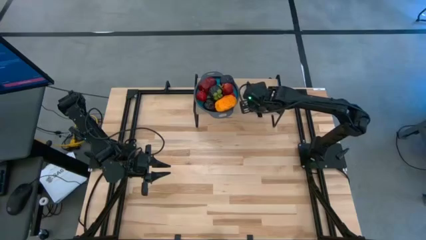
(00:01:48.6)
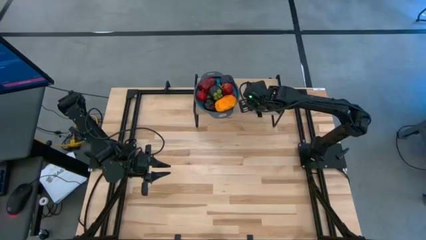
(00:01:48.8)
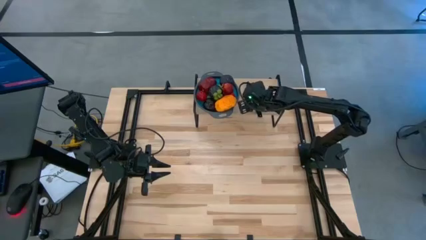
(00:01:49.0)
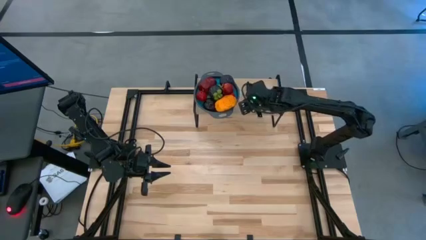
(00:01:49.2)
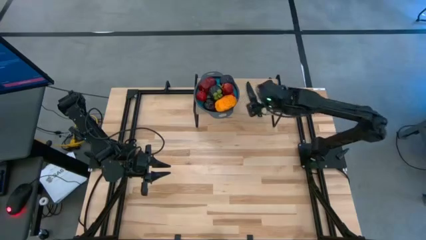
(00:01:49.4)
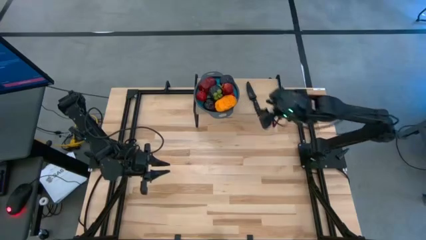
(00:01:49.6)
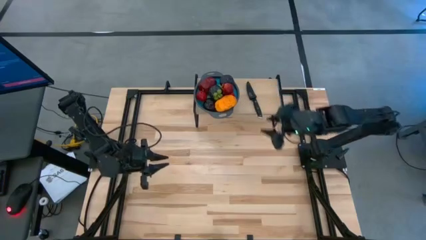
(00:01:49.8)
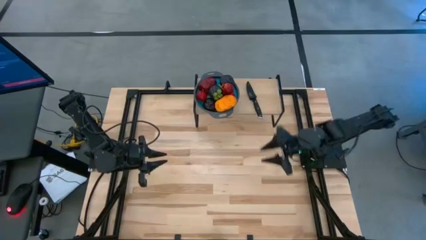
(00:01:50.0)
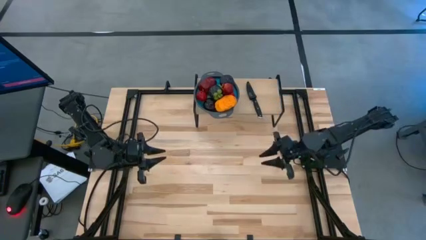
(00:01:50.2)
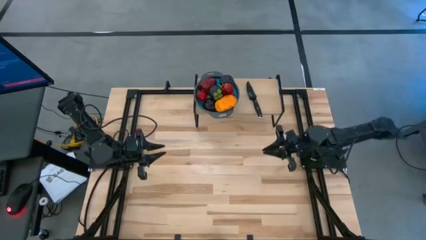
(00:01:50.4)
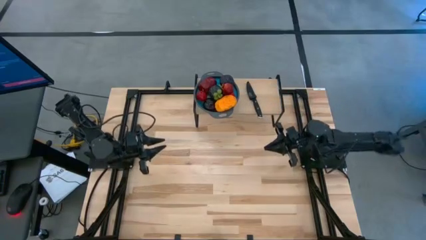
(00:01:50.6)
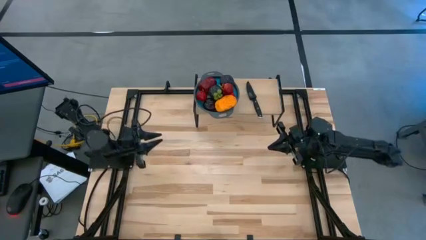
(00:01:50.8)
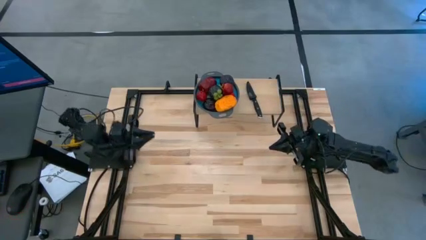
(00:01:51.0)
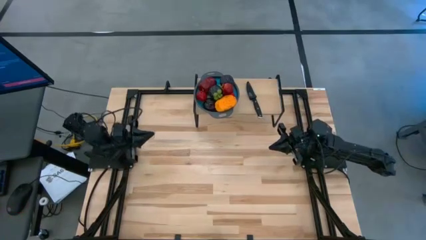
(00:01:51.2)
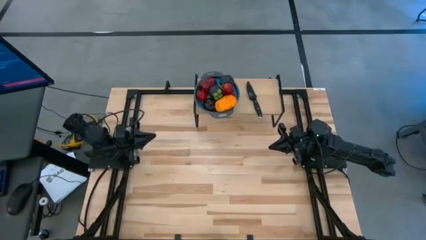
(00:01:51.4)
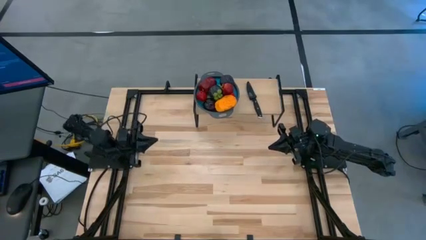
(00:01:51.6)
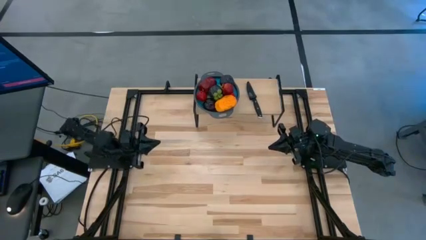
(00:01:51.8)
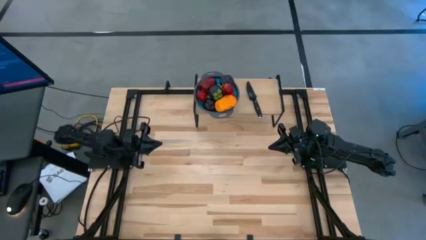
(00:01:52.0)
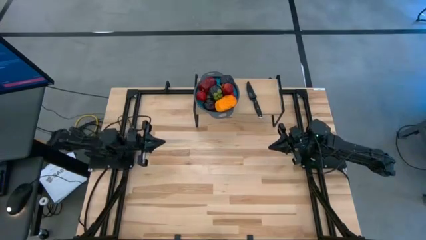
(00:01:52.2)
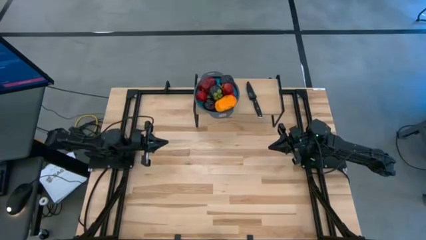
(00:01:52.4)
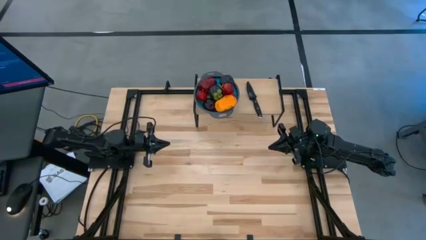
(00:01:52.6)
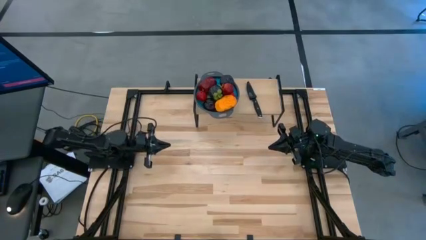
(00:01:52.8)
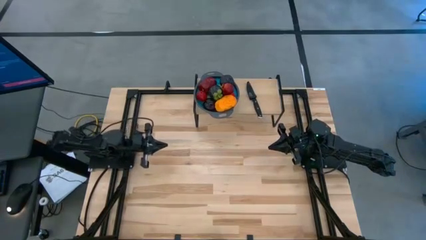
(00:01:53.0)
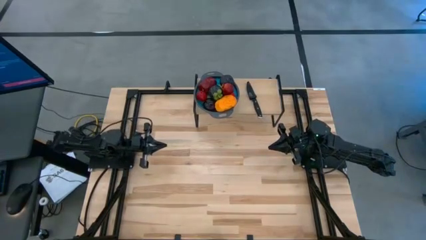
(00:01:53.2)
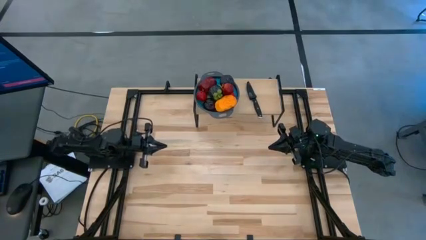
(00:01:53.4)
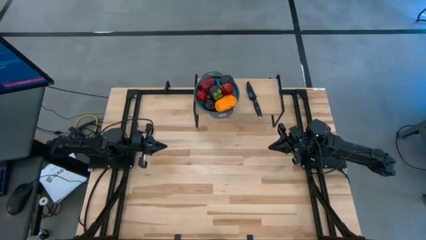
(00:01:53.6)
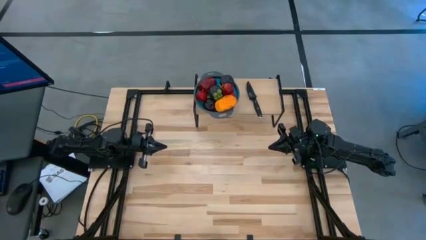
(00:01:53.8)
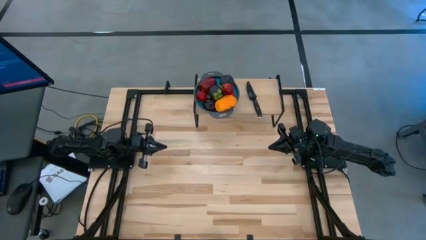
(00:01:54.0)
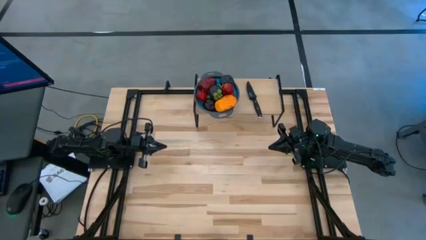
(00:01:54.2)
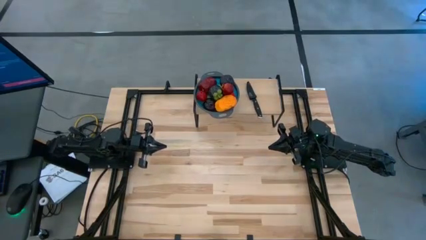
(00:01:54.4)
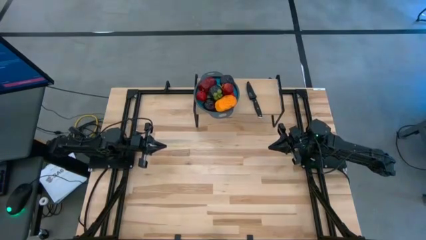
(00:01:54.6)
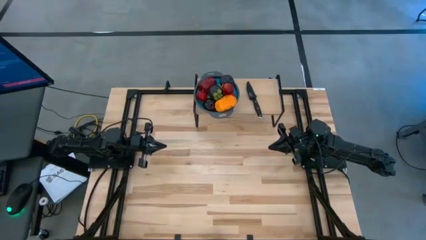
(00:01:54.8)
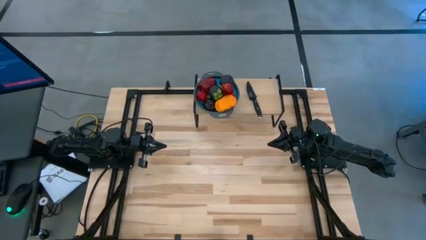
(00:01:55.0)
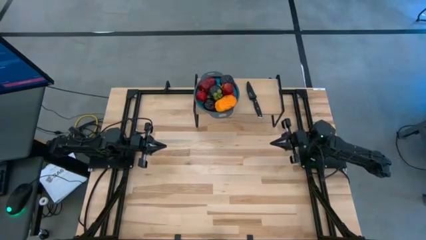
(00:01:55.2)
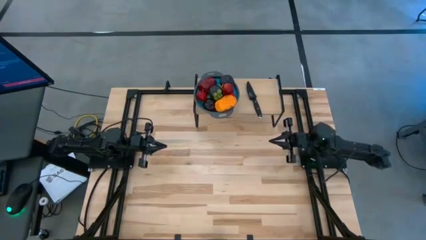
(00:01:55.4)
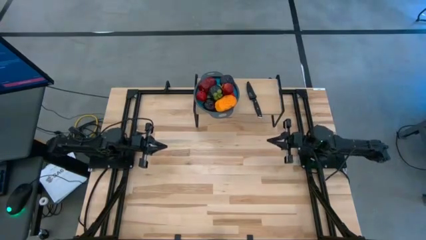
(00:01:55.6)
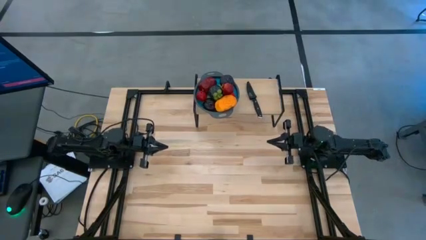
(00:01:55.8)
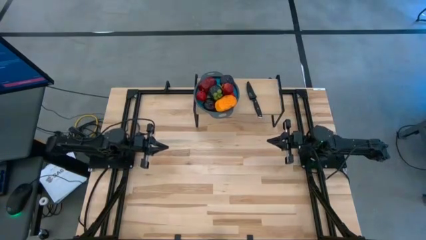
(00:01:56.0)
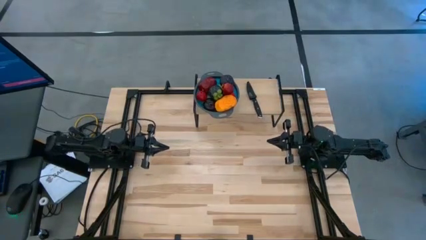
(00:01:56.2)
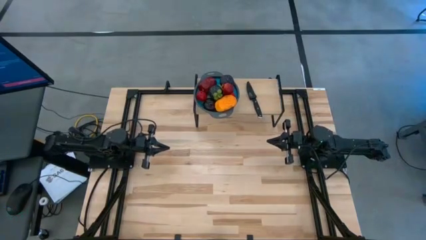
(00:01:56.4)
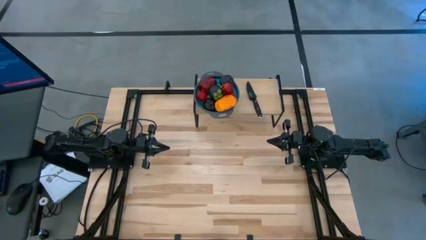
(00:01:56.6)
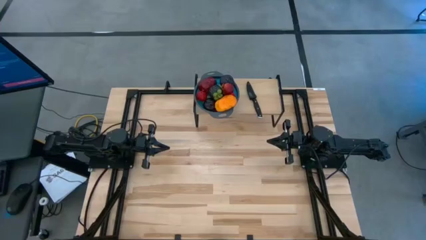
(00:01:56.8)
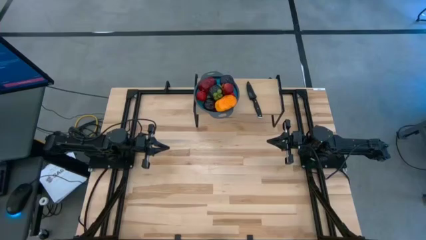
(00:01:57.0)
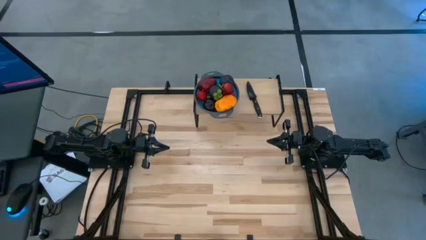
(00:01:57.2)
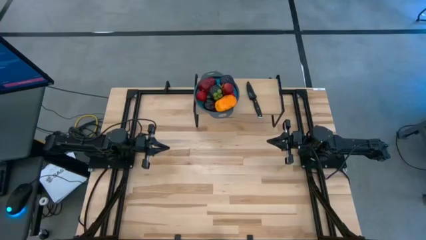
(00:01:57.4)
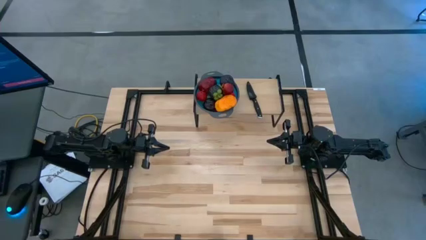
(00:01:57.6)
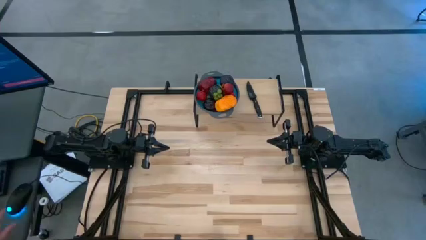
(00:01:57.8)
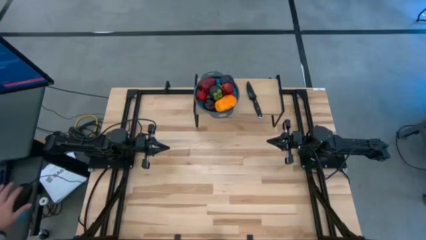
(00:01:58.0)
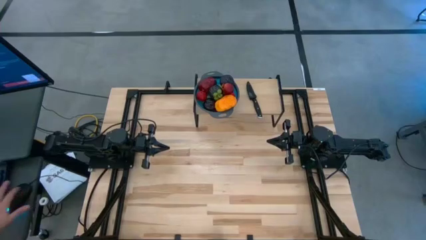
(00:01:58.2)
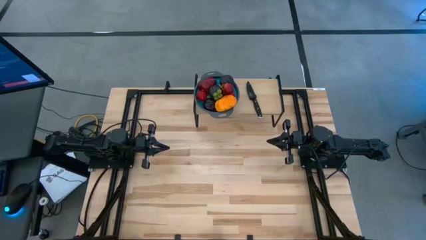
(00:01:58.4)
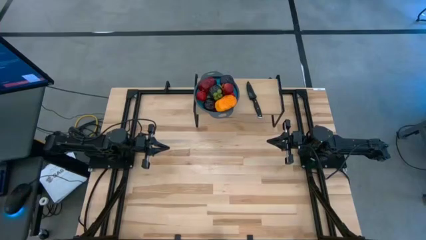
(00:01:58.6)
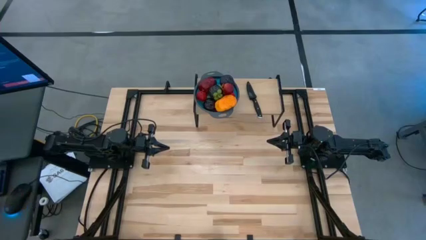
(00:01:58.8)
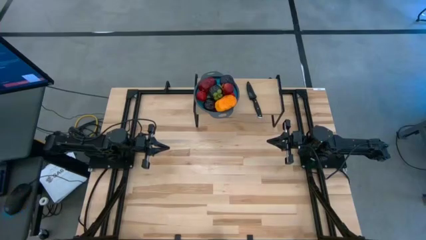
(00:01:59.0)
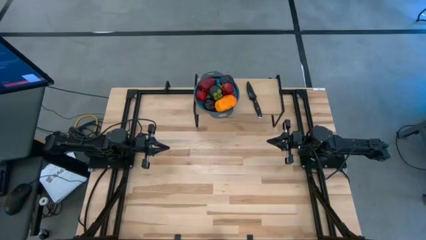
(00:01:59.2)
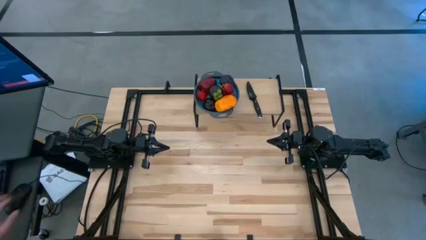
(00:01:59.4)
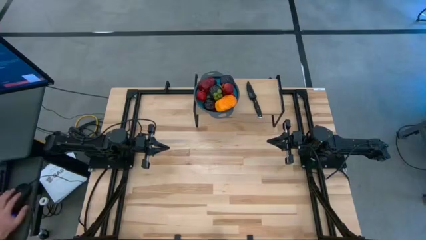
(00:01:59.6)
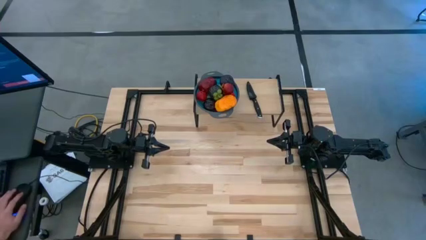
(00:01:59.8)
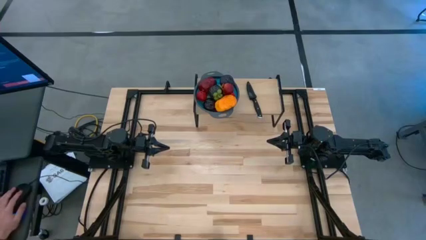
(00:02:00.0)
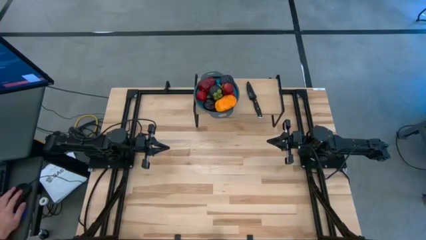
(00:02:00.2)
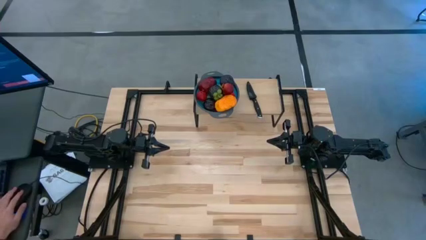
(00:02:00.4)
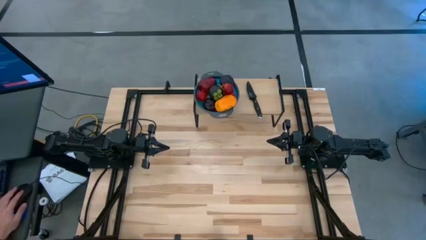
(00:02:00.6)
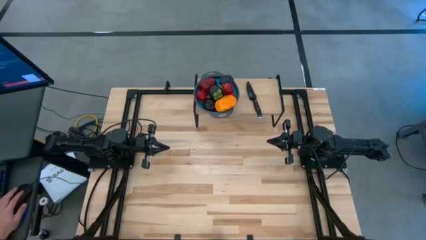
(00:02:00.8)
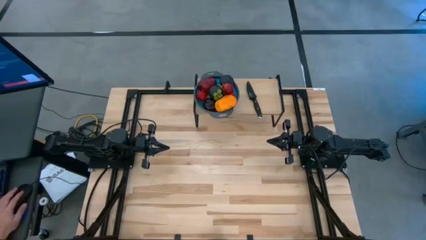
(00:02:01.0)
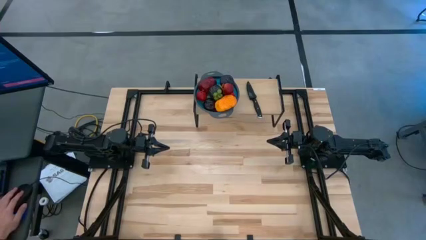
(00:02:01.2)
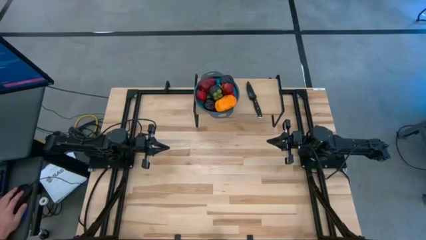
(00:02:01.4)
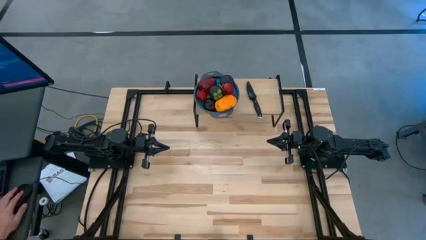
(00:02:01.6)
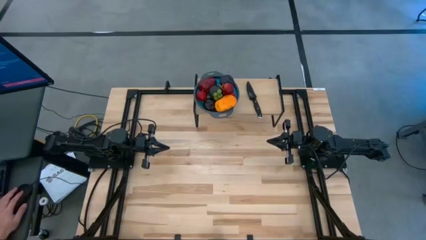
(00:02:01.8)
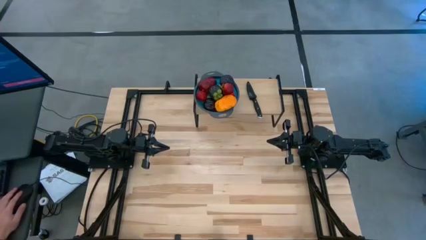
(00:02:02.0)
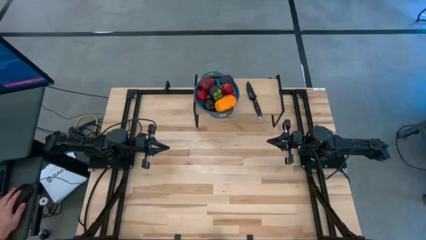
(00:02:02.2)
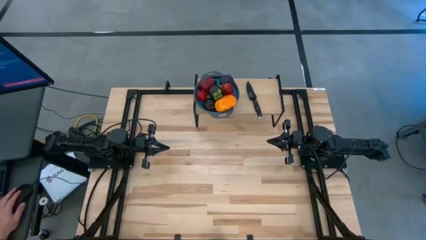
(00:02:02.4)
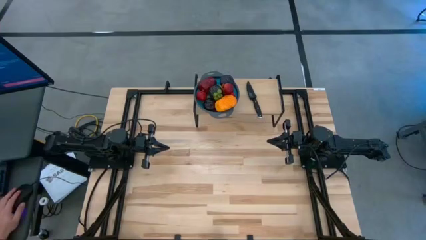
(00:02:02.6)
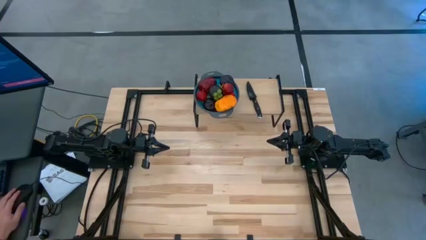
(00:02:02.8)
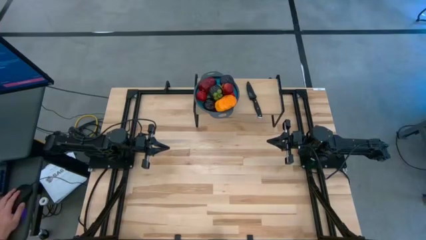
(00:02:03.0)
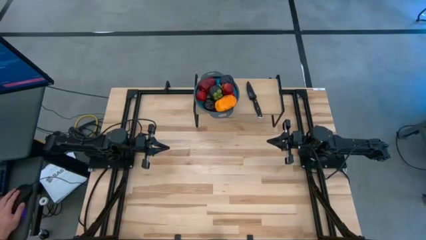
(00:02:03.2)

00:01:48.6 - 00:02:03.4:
Task: Pick & Place Fruit
Return to Home Position

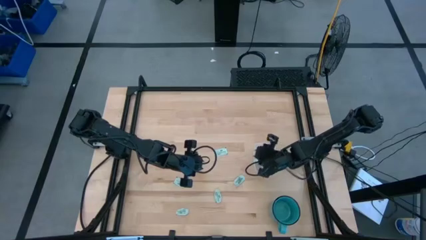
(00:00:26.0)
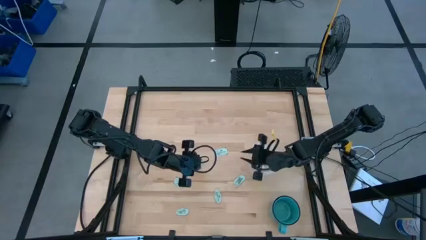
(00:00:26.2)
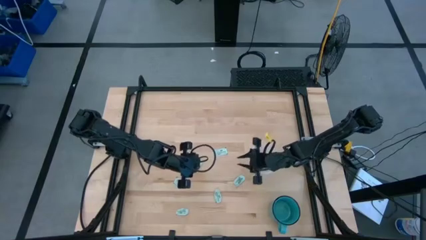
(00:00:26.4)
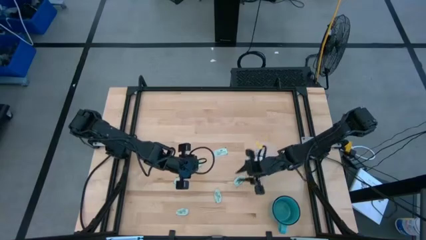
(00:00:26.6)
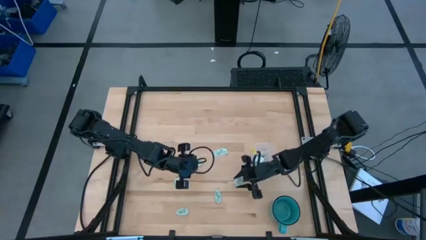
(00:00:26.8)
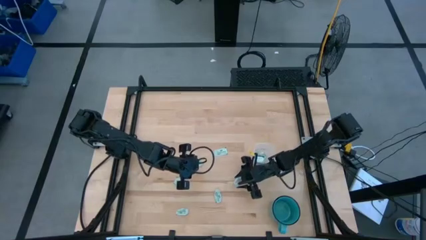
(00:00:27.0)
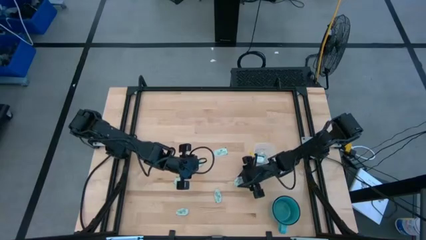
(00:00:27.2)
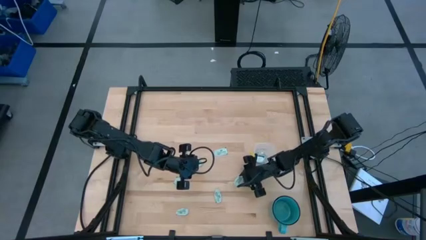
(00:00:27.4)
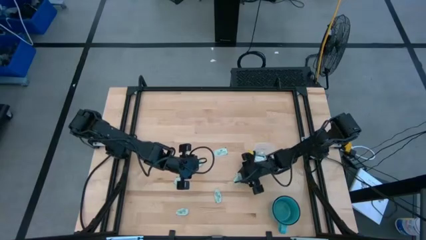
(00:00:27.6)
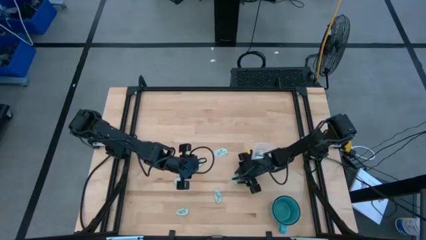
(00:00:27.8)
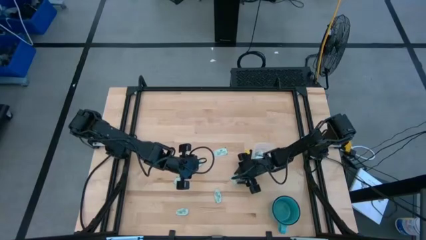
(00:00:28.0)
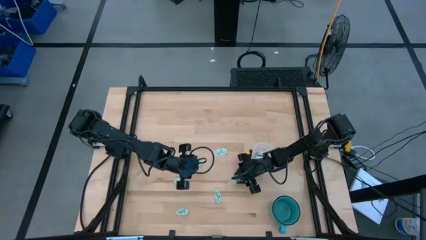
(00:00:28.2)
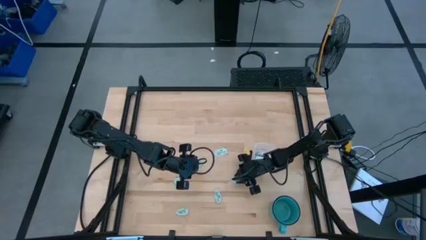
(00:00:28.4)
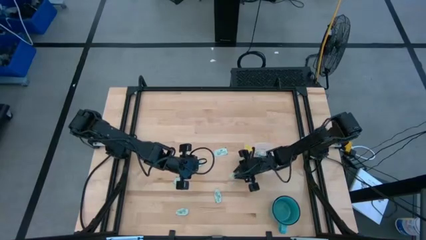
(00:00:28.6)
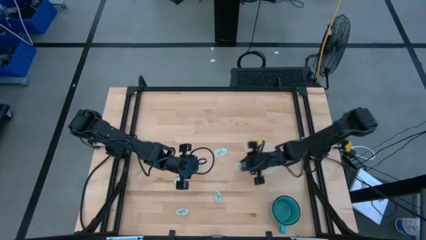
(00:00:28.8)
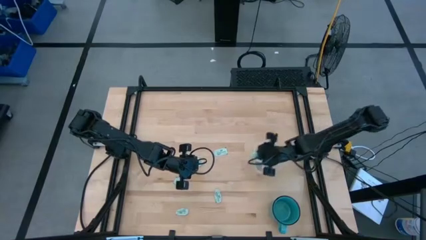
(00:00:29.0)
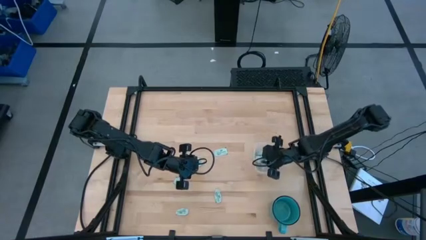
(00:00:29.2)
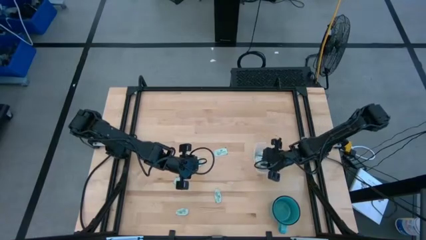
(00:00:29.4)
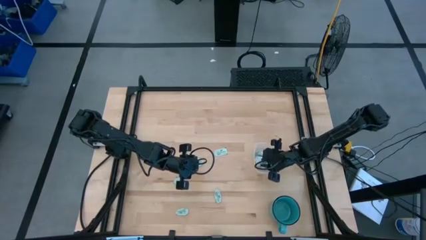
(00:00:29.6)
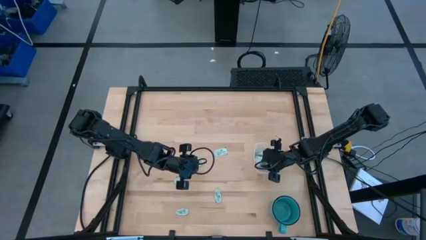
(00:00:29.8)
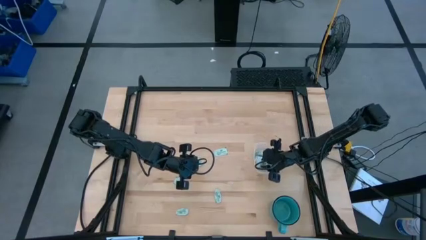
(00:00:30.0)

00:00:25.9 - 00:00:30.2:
Task: Pick and place Stevia / Truvia into bins
Put the stevia packet into the bin
